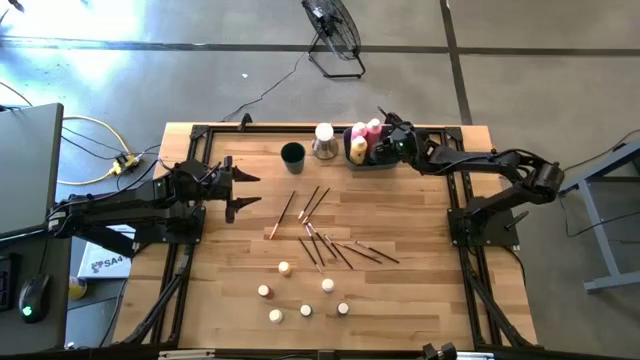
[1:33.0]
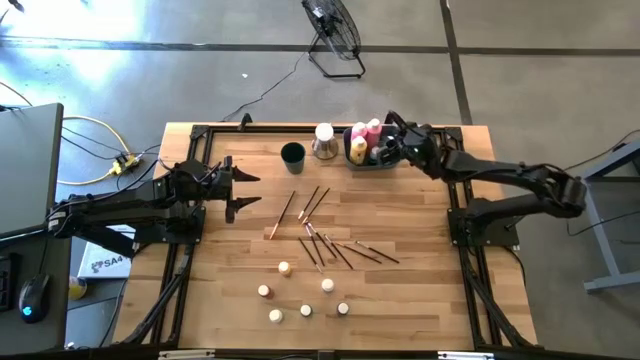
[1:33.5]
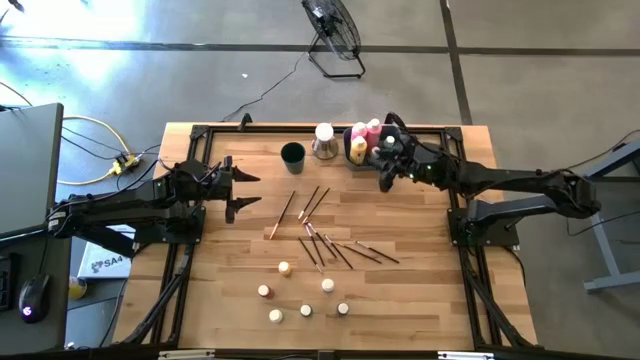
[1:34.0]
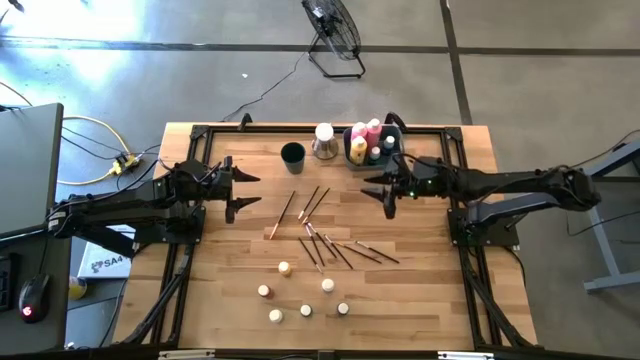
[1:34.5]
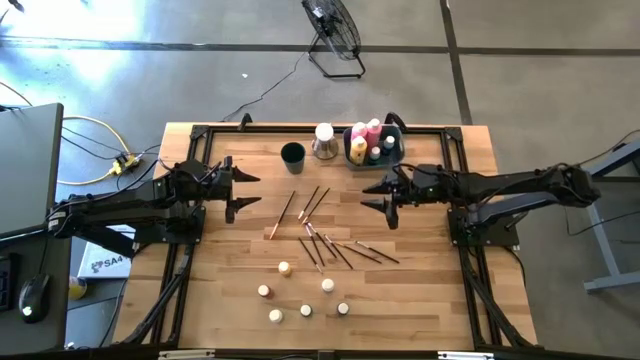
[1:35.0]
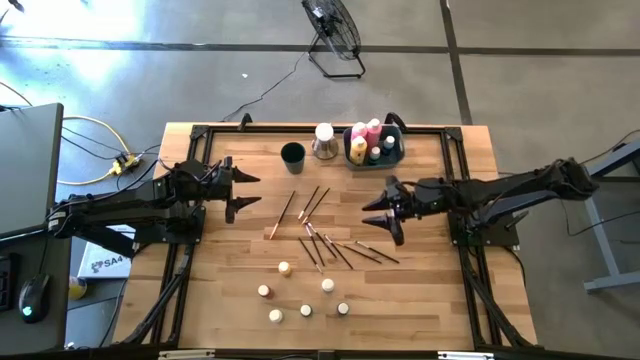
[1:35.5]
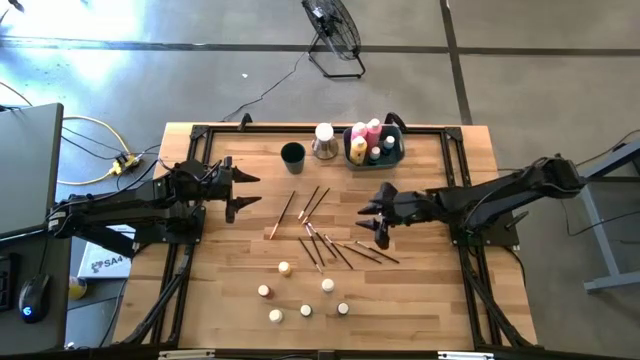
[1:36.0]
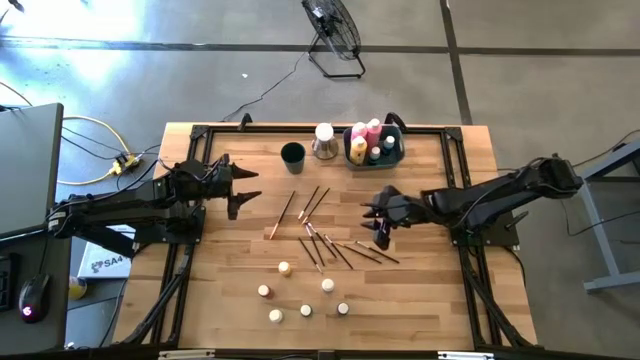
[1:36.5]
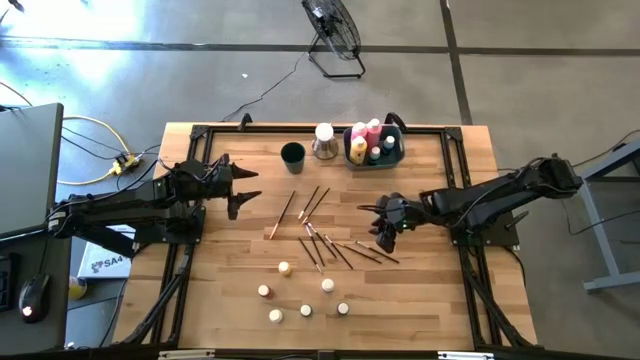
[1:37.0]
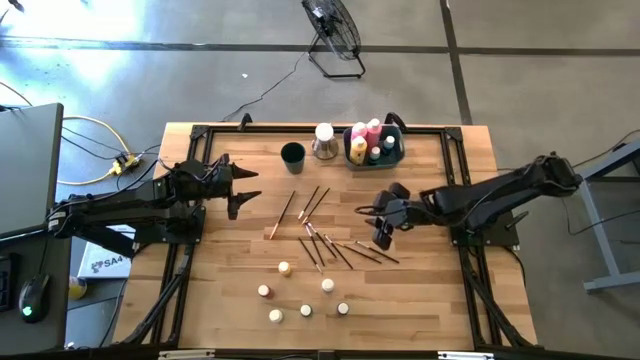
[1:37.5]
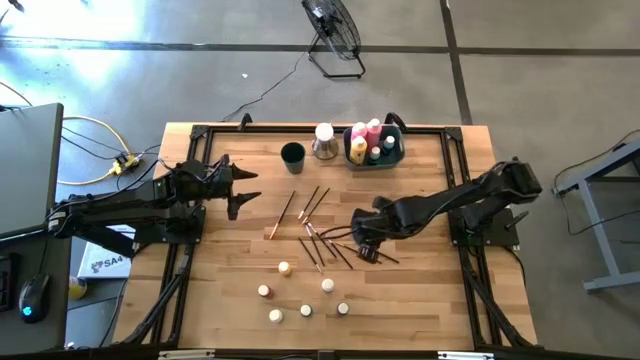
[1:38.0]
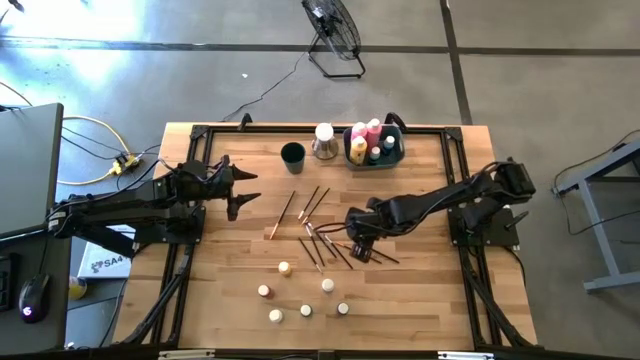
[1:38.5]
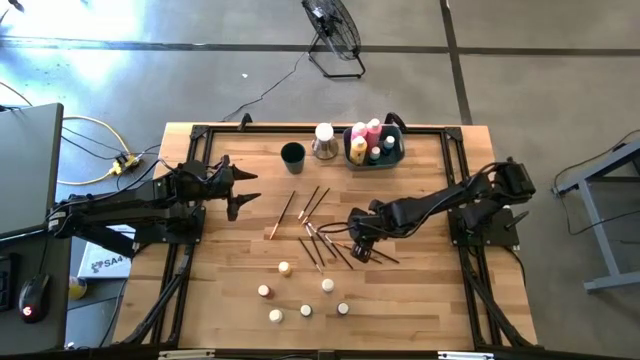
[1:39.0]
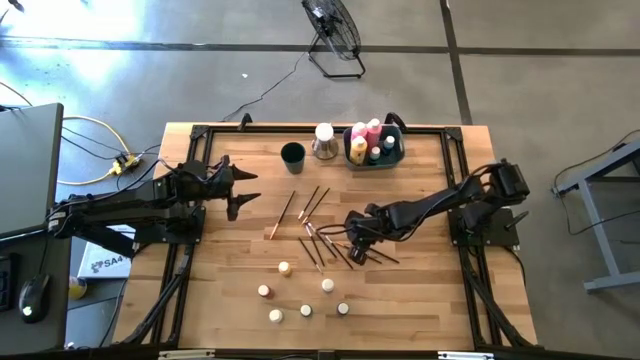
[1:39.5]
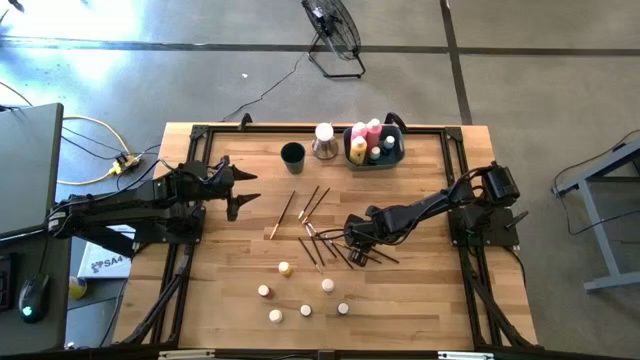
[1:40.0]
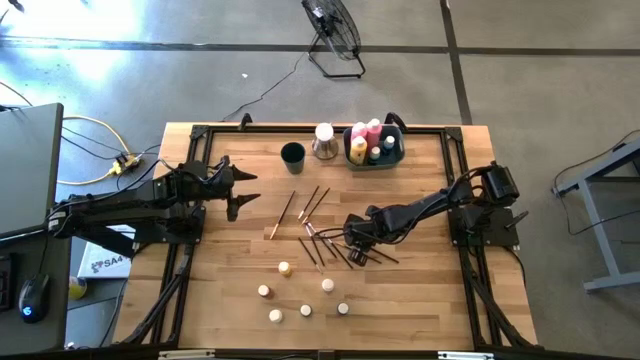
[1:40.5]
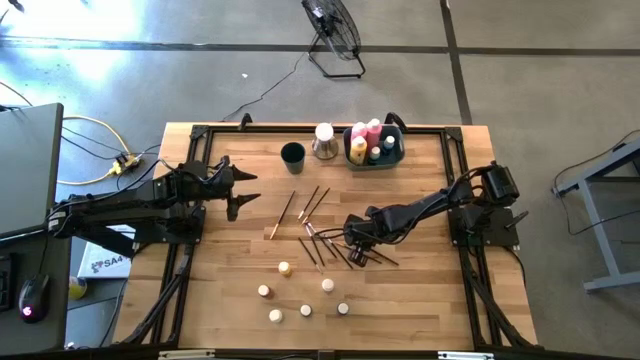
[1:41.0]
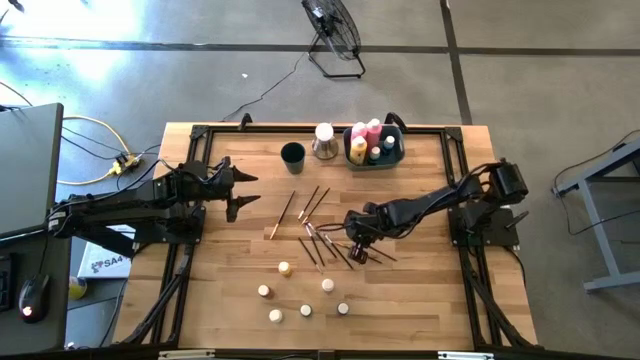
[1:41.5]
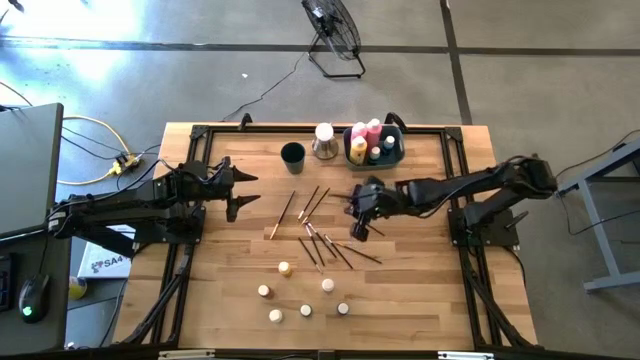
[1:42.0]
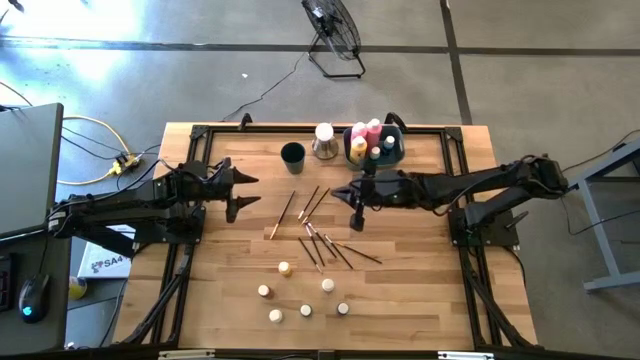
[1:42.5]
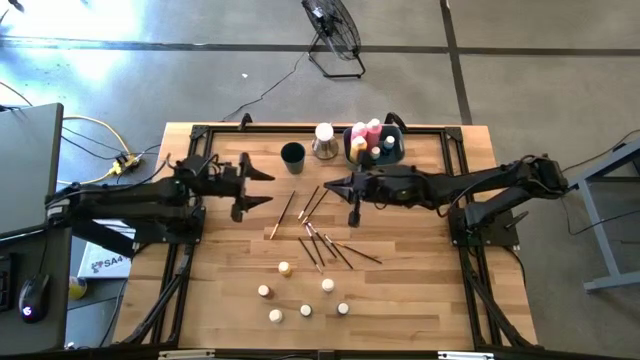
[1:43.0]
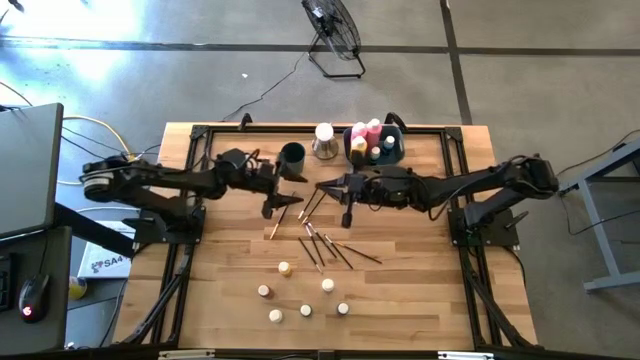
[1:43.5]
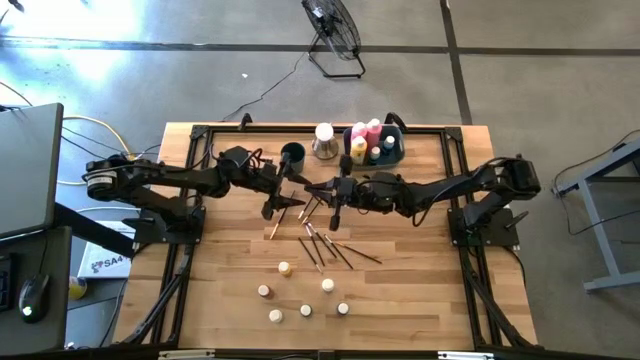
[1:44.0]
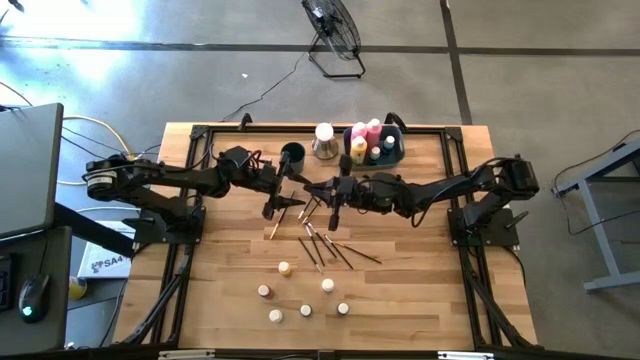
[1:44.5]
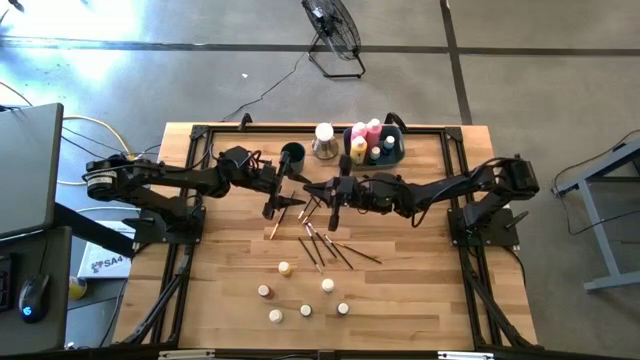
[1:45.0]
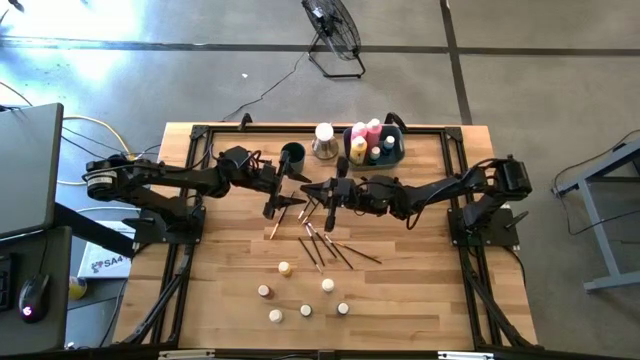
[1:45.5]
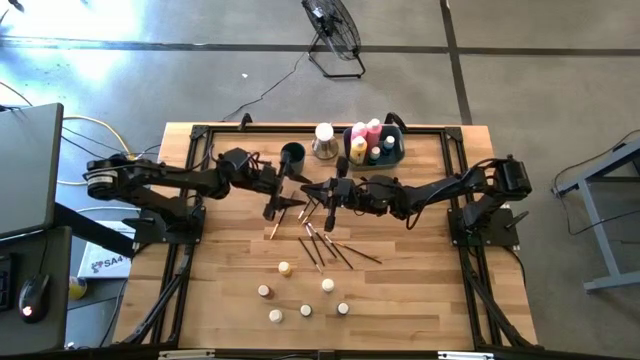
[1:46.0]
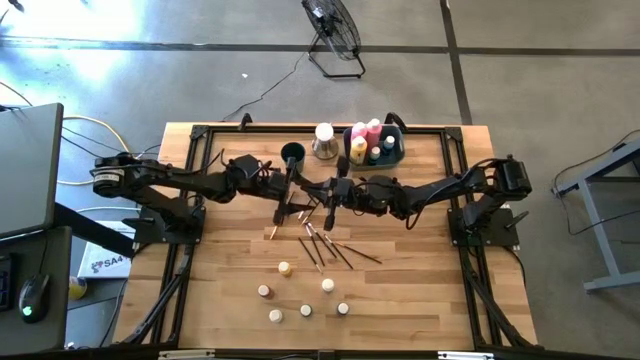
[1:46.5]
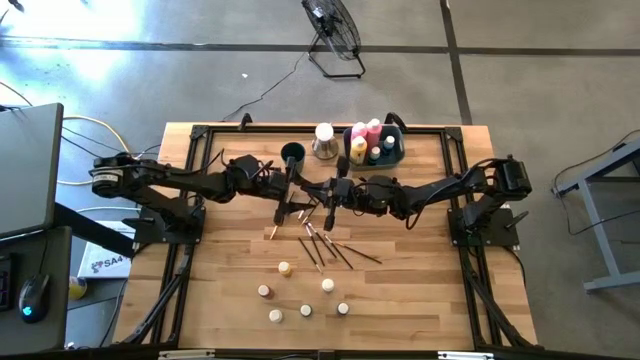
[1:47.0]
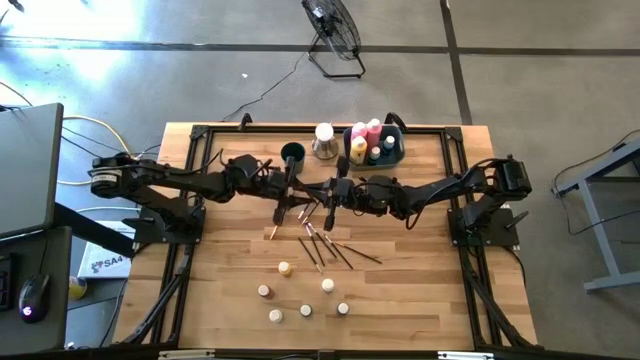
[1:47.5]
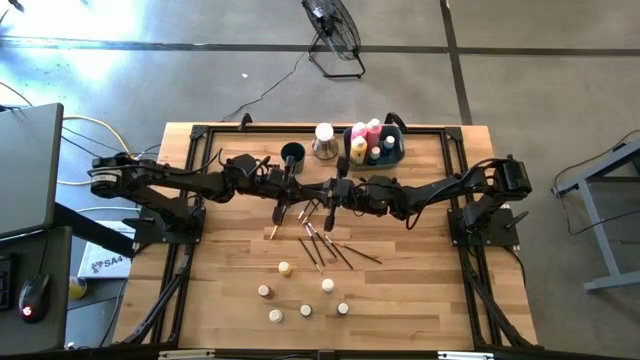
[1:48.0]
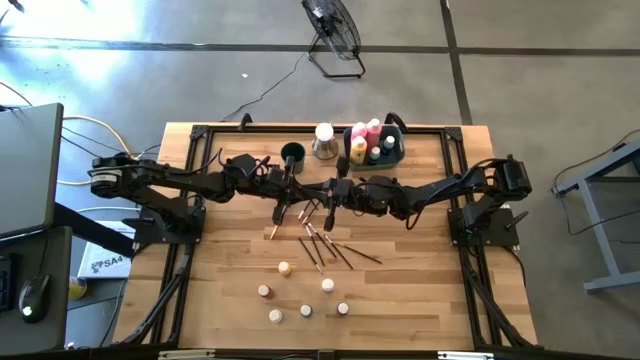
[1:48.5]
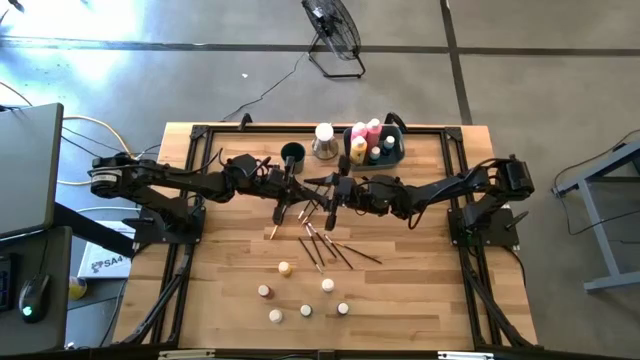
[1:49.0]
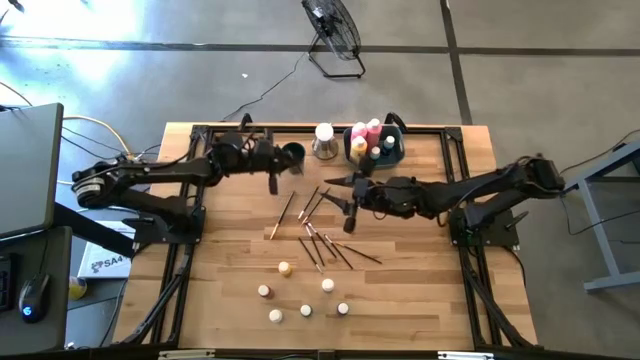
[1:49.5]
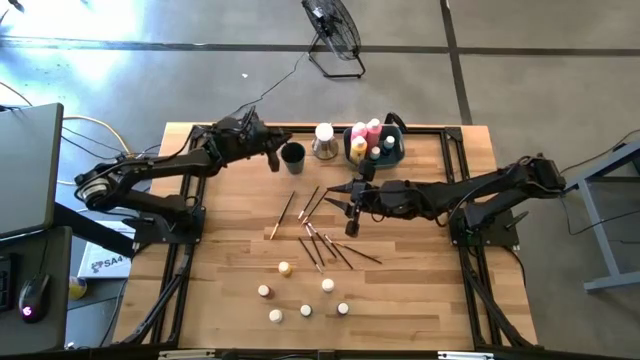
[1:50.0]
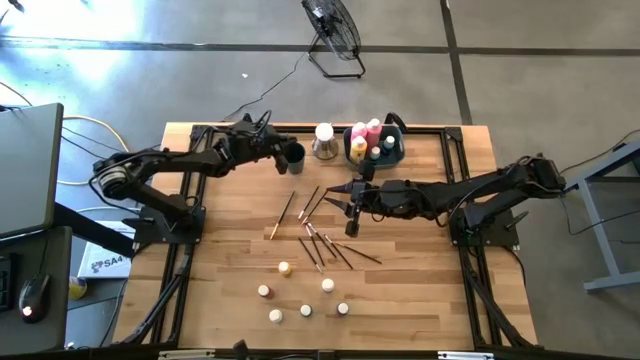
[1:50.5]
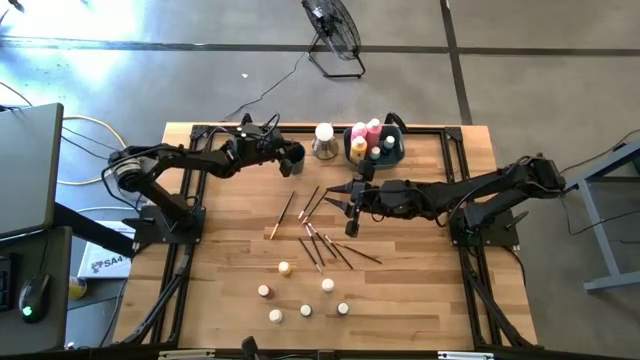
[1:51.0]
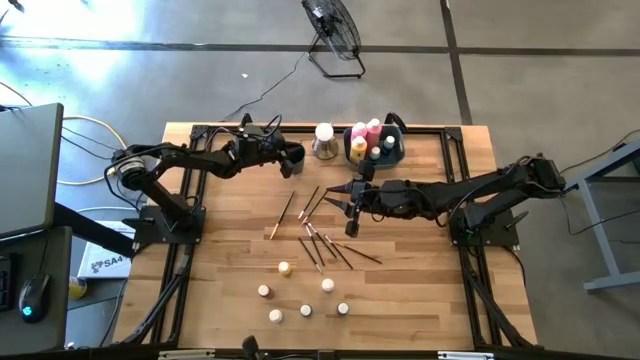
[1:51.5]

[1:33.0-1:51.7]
Task: Pick & Place Paint Supplies
Put the silver paintbrush into the blue cup
